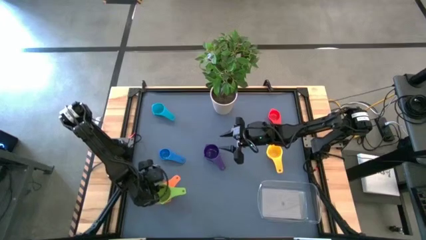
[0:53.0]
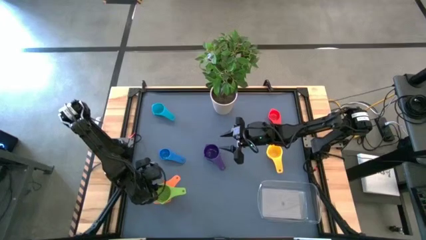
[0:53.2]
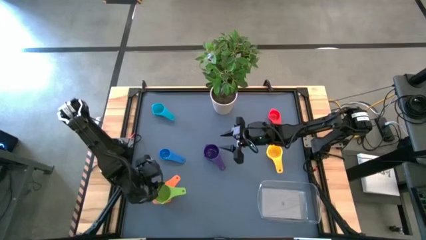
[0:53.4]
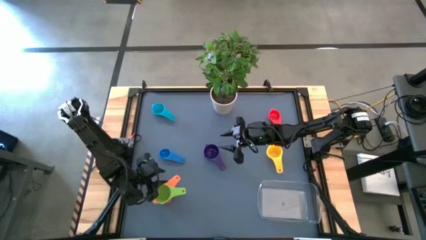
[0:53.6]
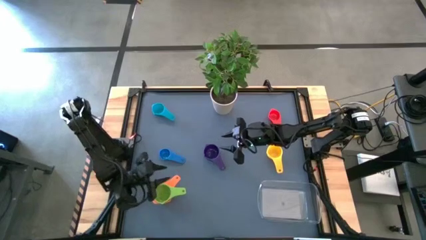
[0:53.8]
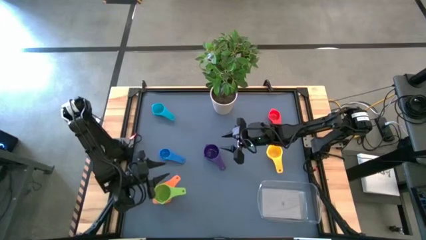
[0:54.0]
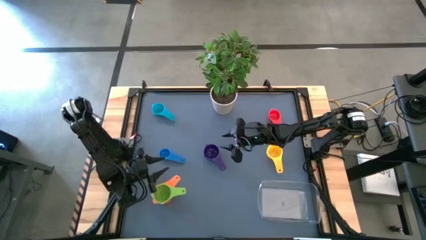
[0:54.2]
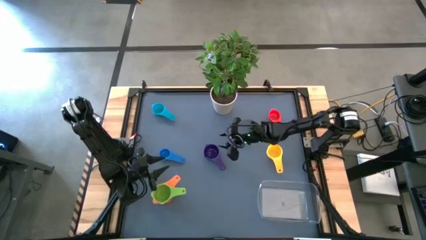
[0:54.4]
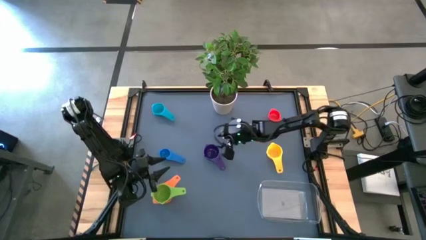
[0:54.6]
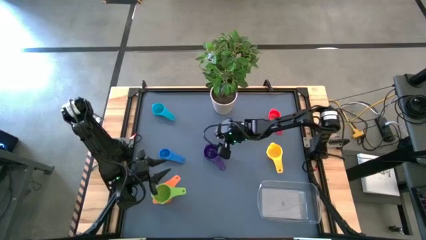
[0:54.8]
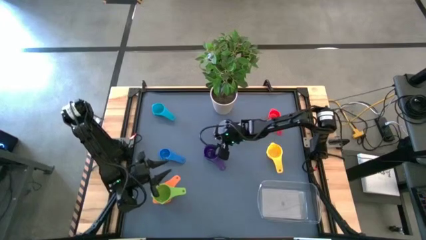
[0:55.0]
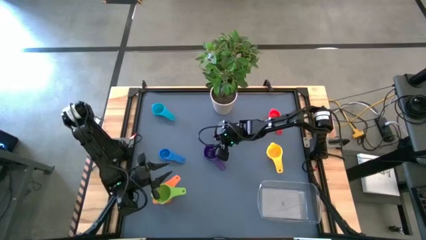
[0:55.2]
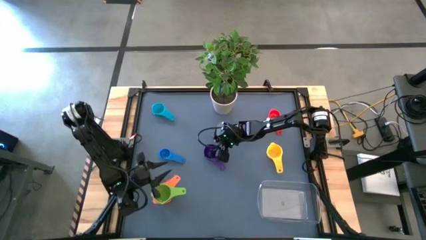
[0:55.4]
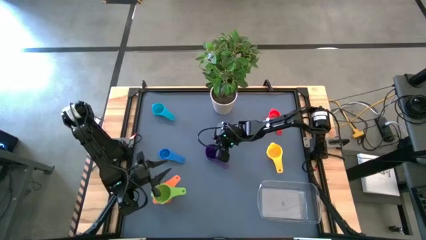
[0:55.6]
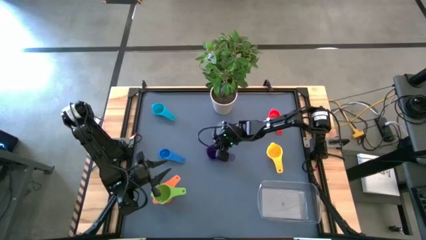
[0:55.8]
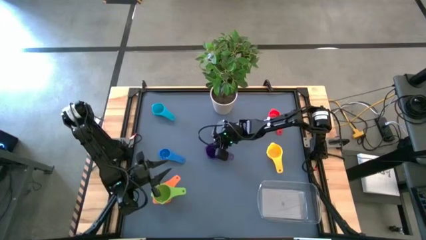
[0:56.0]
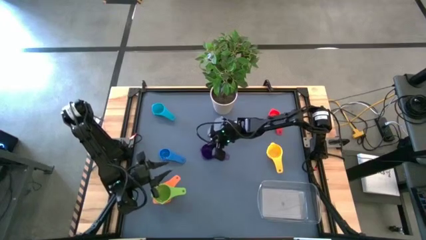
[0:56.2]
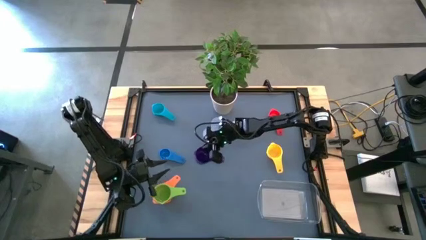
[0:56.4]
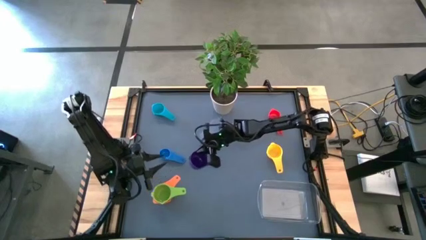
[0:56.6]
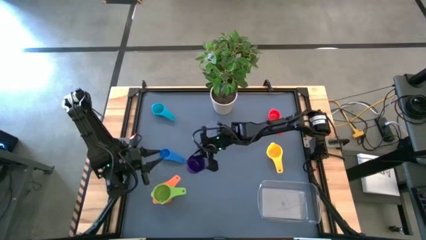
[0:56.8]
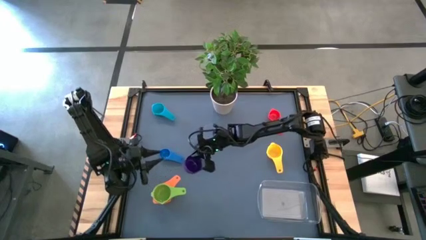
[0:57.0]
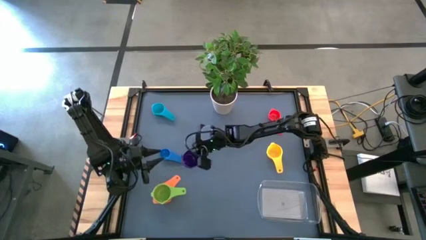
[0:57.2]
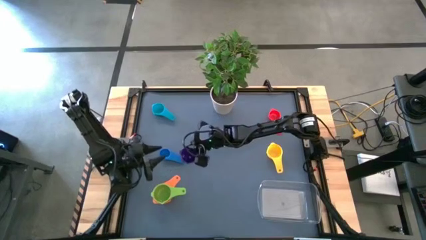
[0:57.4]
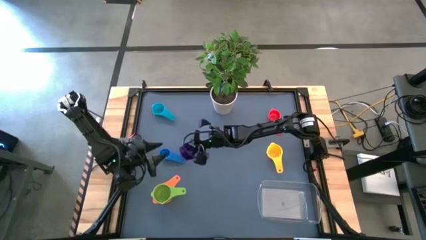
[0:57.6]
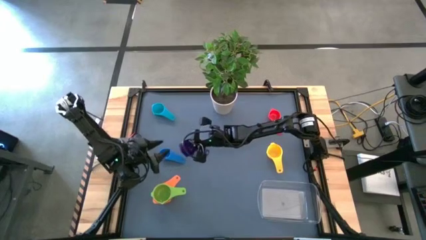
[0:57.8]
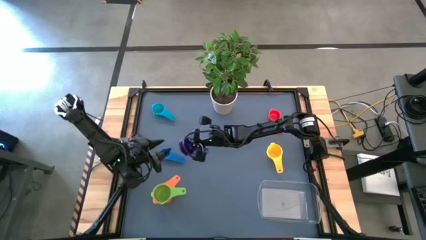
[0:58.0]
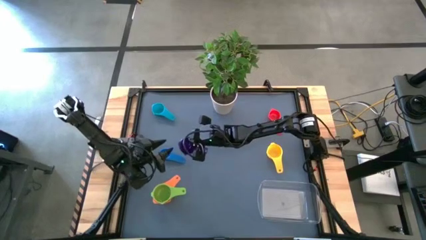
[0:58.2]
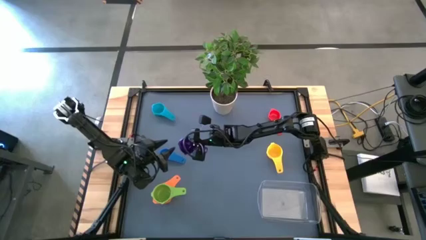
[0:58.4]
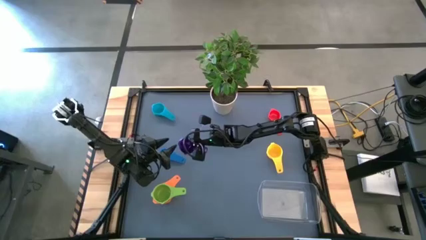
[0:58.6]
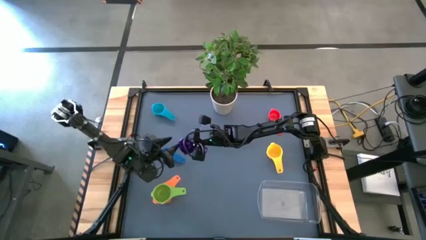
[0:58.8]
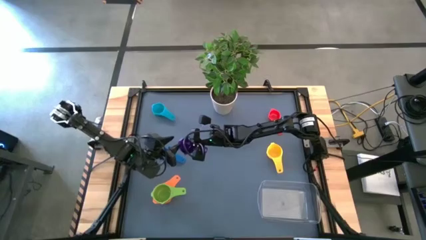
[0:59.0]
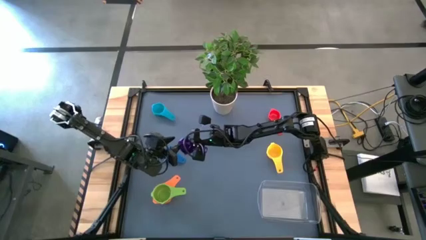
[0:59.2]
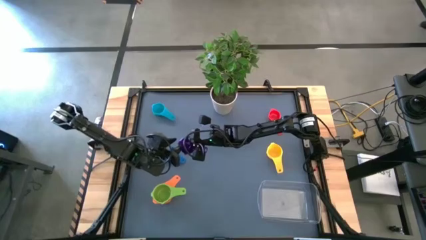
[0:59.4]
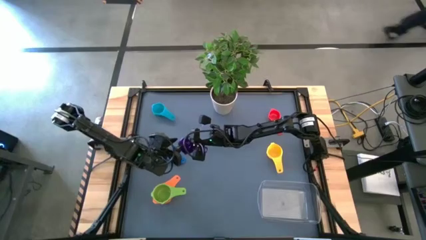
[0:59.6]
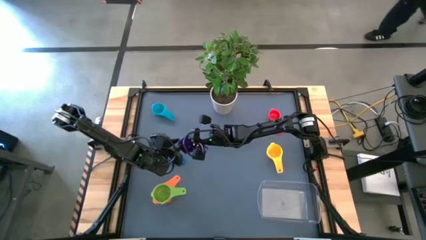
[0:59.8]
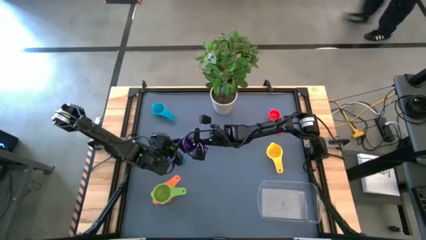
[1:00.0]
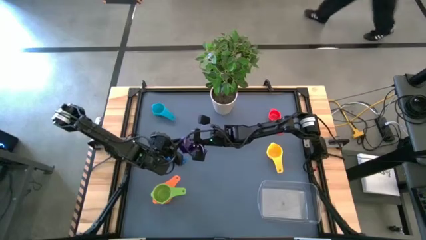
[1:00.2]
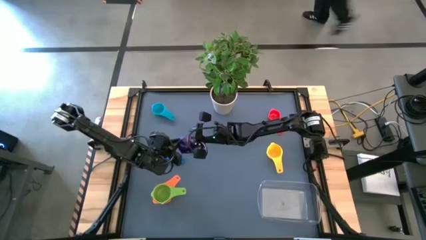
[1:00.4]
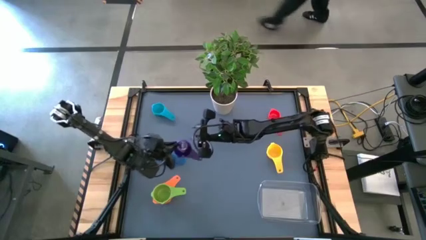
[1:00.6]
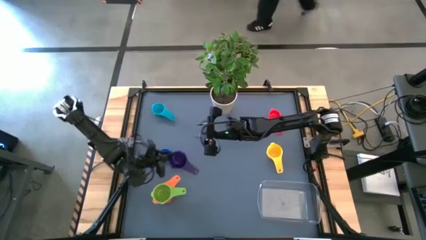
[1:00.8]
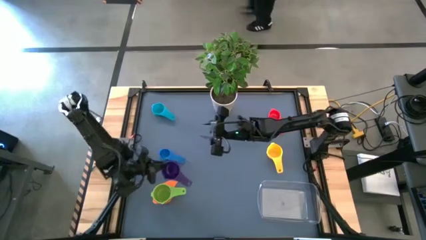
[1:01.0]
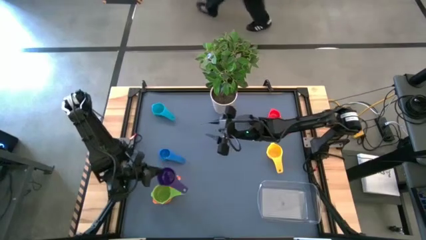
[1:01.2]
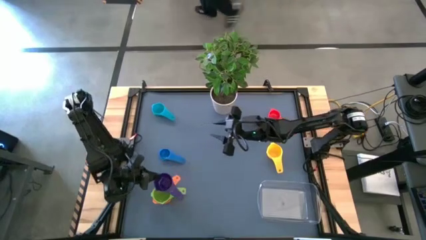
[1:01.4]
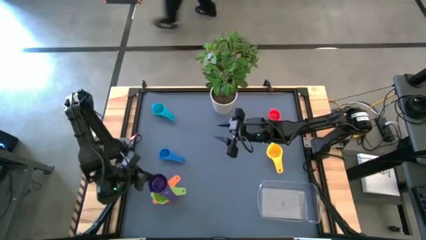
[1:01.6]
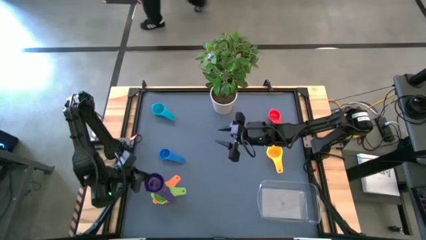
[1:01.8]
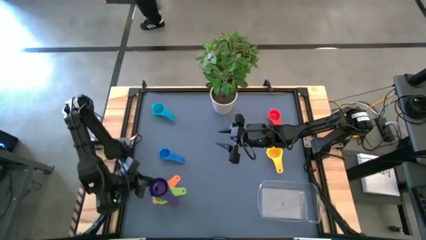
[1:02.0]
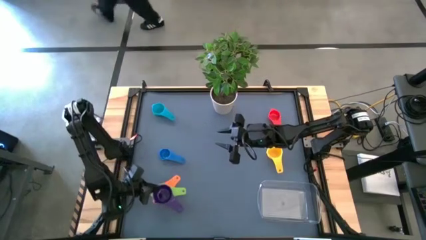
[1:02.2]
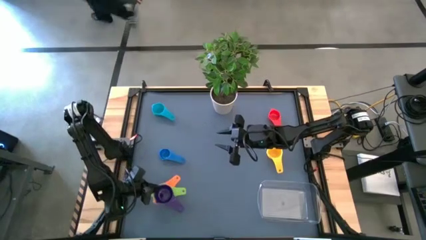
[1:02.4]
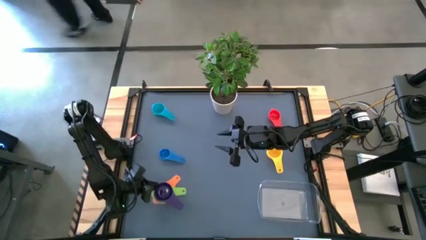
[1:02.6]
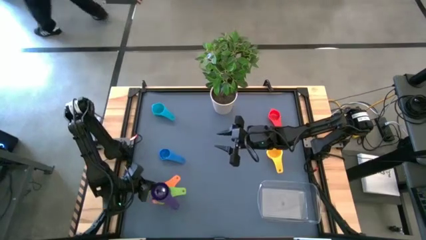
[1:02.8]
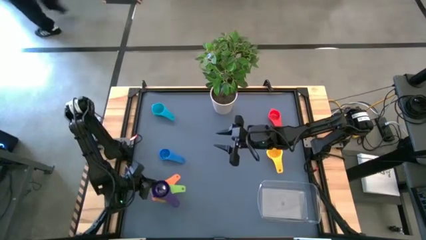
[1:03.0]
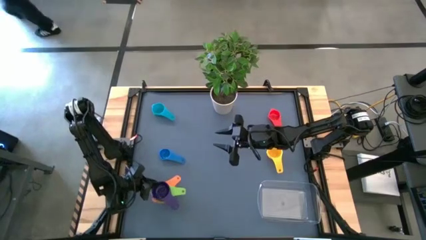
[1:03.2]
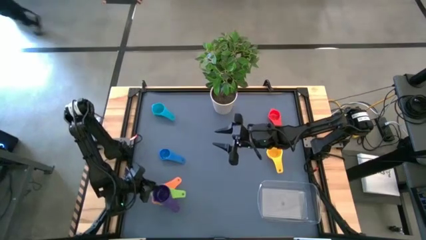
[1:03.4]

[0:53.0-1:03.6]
Task: Nest measuring cups in basket
Stack the violet measuring cup on top of the green measuring cup

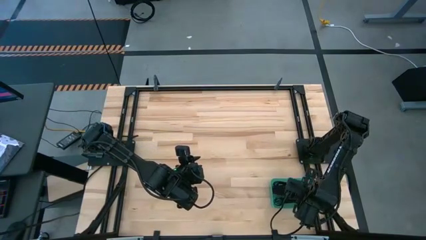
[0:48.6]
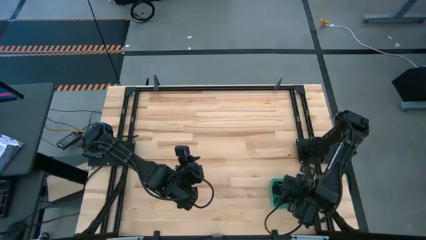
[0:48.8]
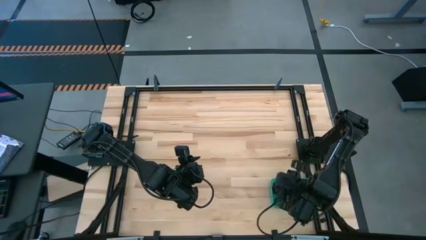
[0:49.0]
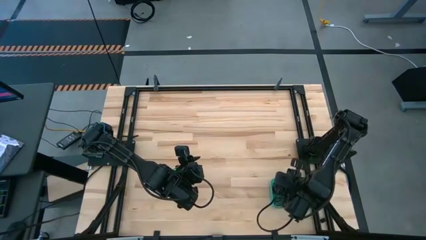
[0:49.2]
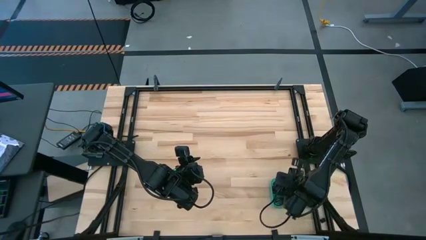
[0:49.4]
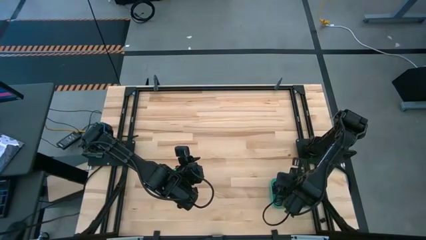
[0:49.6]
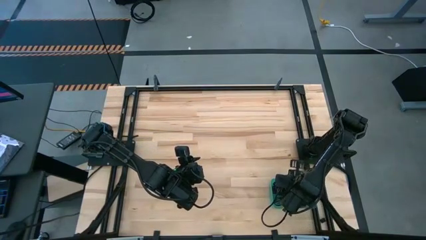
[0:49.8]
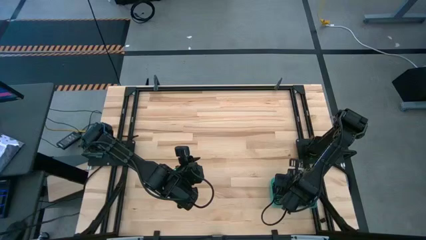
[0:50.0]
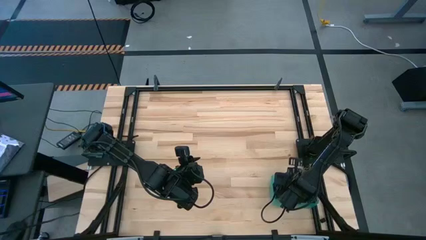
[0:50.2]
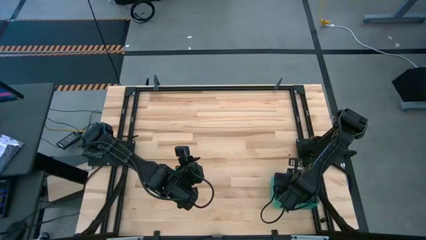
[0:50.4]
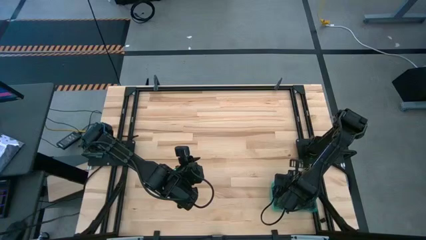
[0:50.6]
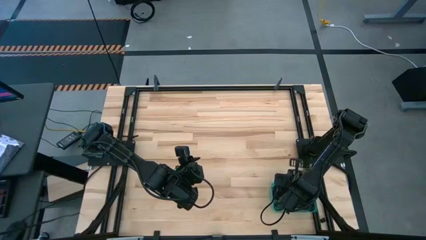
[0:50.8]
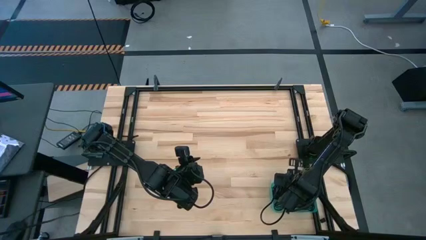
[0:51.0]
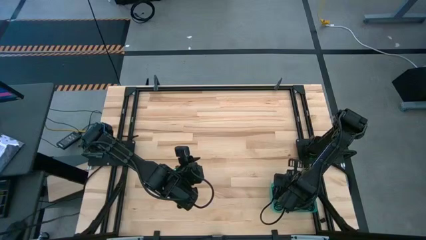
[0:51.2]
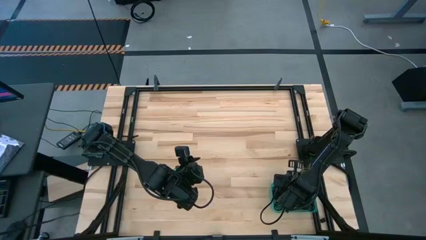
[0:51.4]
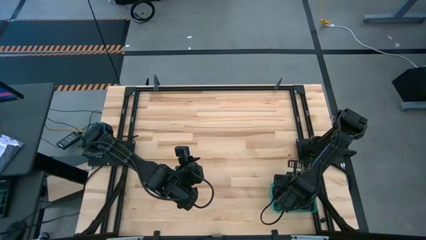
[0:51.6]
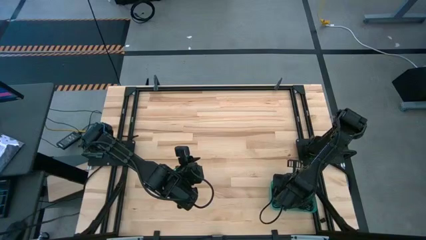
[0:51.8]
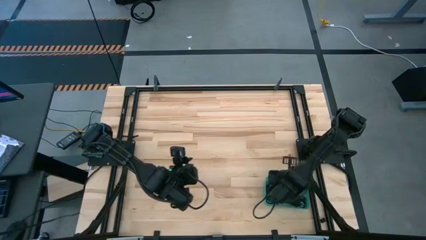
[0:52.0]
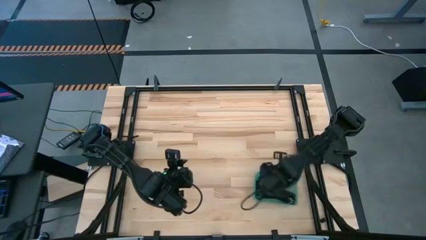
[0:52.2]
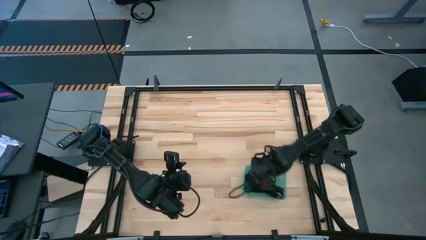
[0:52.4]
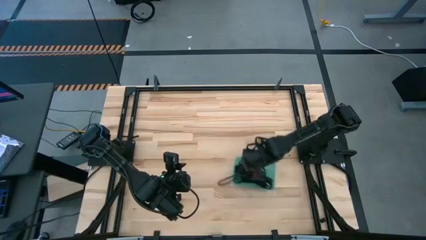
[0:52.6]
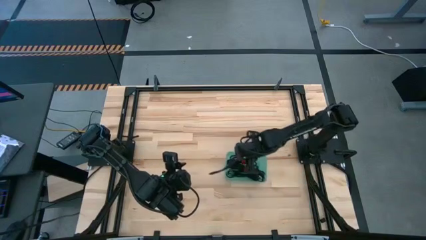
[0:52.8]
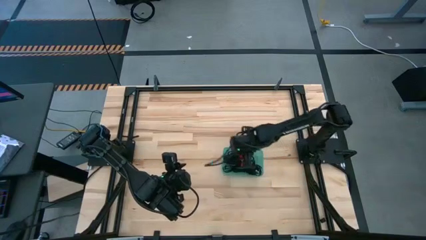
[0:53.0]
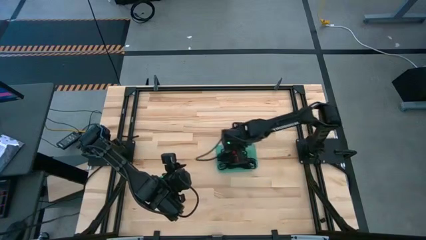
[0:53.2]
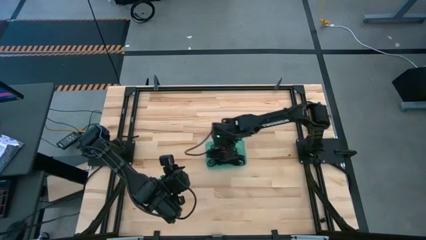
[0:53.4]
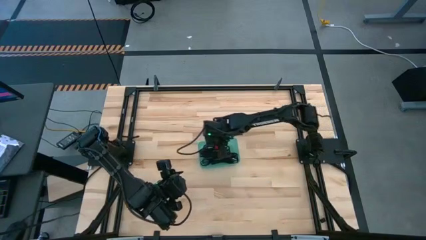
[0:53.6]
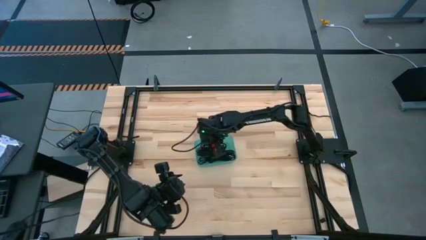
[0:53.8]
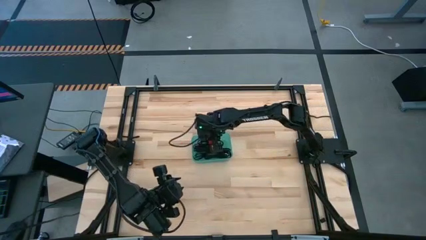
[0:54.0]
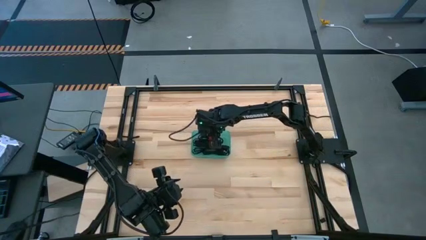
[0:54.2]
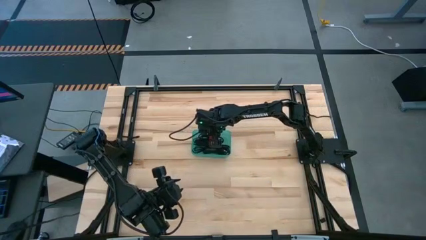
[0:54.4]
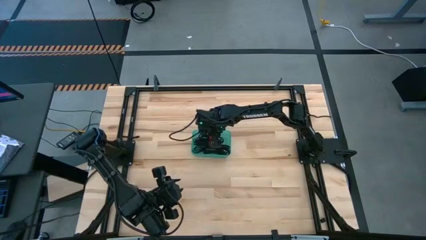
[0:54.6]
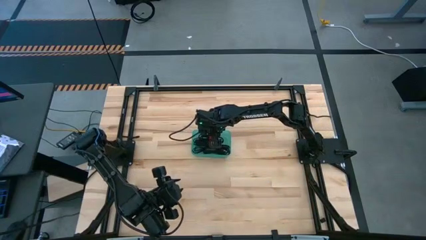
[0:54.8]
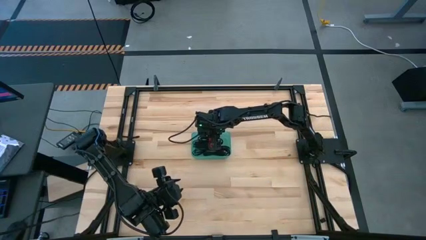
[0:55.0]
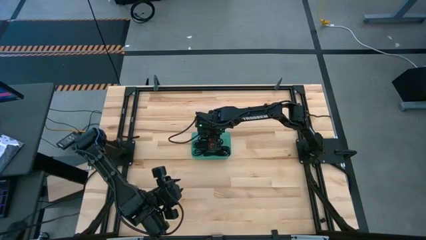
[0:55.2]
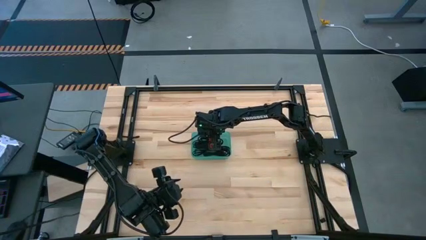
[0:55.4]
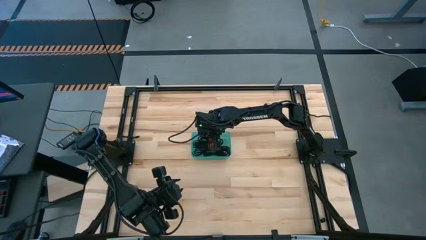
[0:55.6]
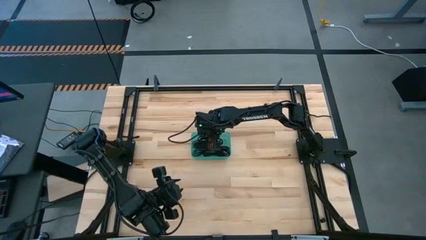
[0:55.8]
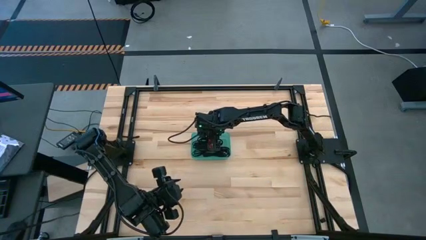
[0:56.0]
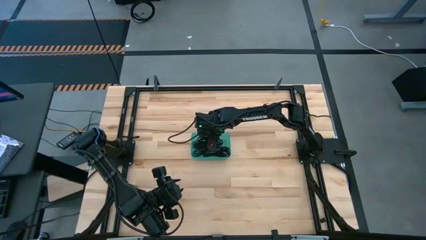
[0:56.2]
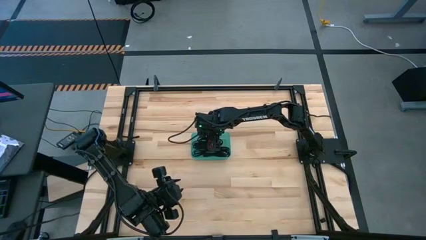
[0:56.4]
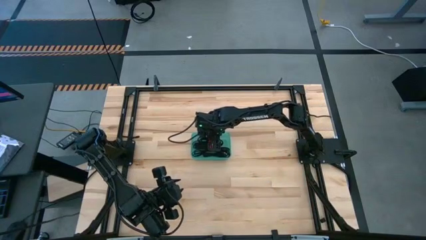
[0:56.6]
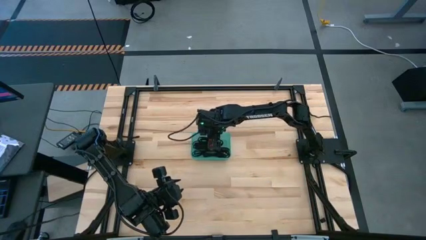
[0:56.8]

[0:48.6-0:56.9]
Task: Pick and place USB-C Cables
Move the green bin to the middle of the table
